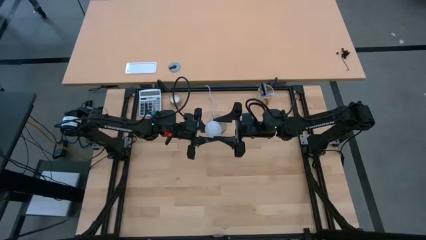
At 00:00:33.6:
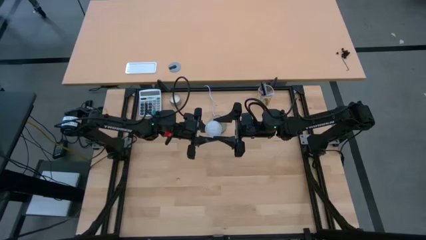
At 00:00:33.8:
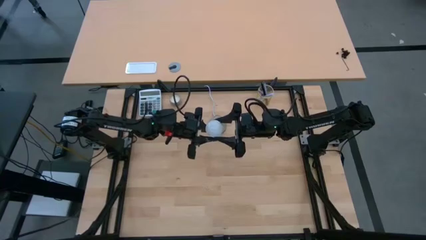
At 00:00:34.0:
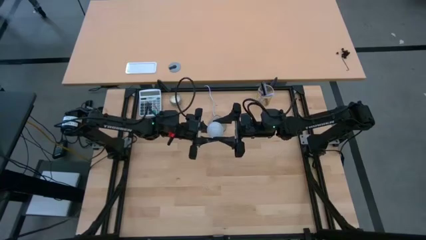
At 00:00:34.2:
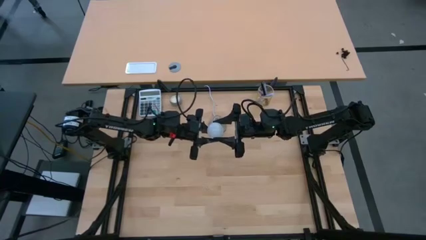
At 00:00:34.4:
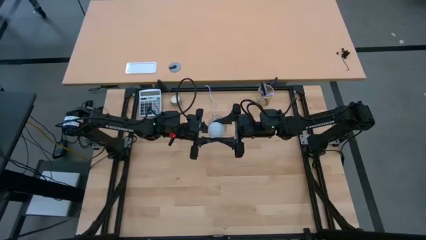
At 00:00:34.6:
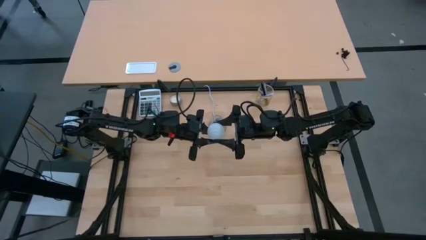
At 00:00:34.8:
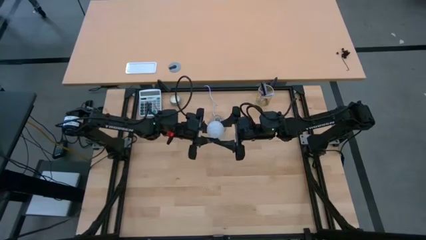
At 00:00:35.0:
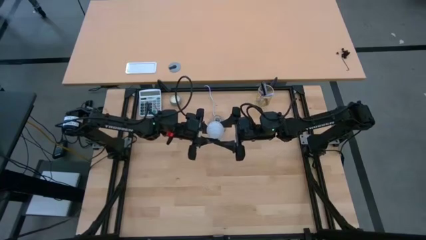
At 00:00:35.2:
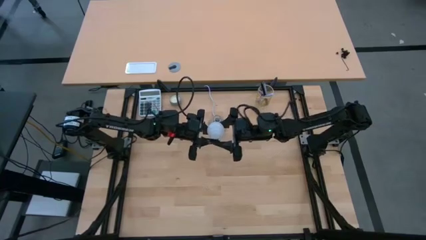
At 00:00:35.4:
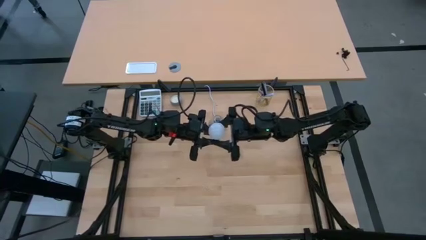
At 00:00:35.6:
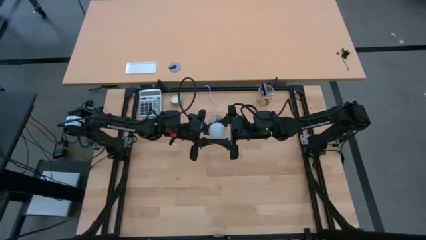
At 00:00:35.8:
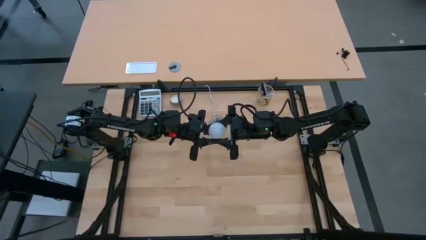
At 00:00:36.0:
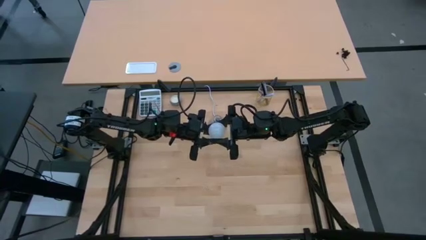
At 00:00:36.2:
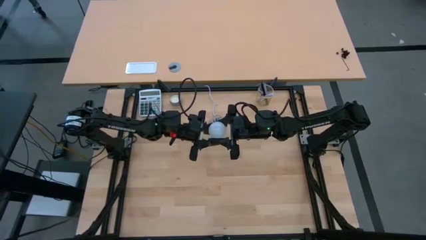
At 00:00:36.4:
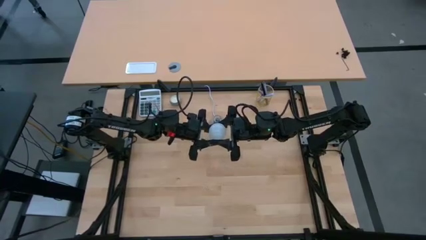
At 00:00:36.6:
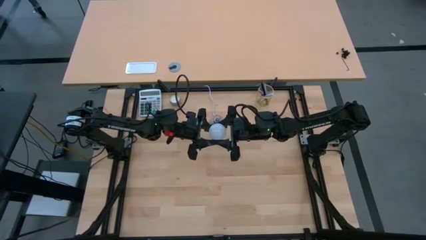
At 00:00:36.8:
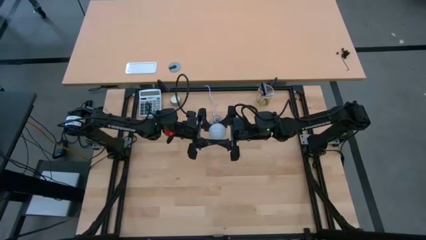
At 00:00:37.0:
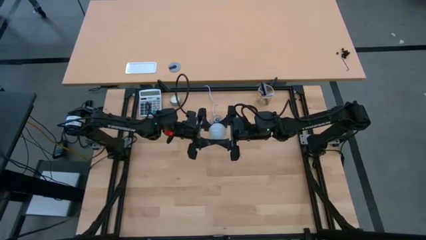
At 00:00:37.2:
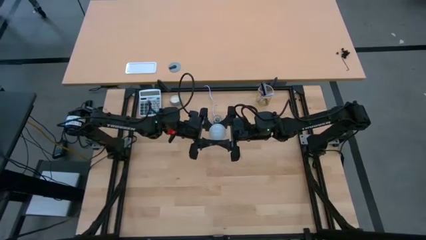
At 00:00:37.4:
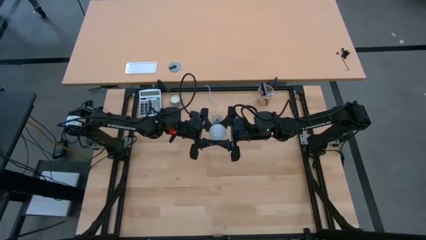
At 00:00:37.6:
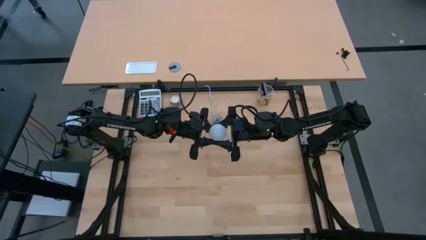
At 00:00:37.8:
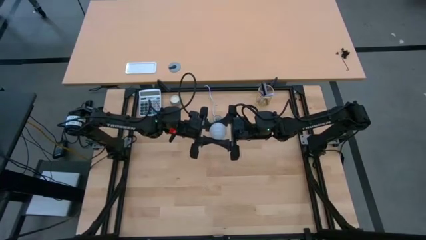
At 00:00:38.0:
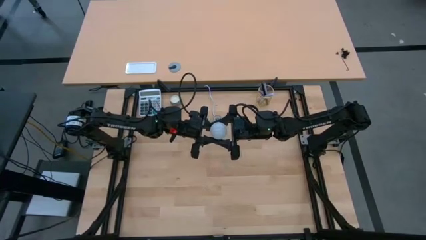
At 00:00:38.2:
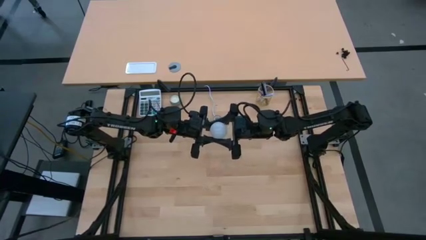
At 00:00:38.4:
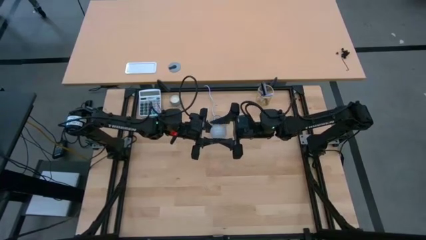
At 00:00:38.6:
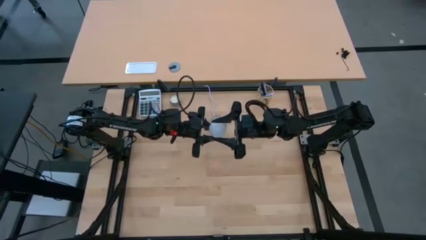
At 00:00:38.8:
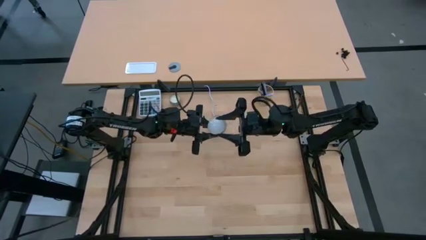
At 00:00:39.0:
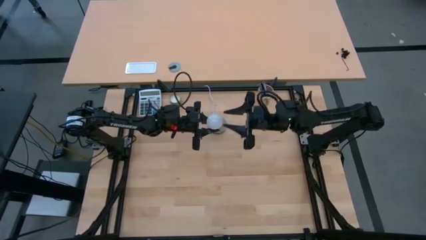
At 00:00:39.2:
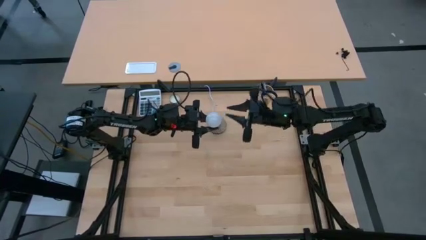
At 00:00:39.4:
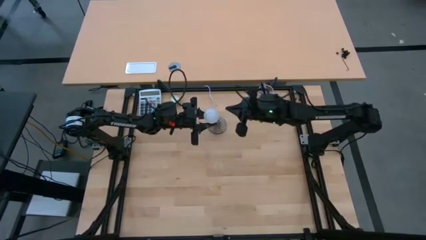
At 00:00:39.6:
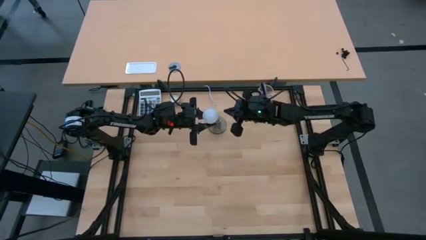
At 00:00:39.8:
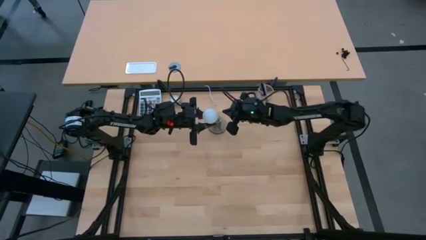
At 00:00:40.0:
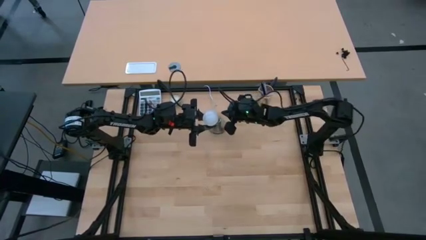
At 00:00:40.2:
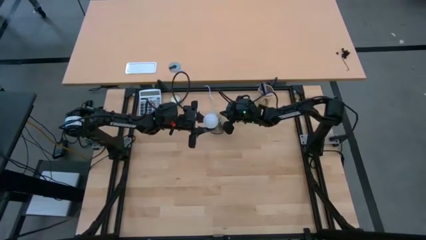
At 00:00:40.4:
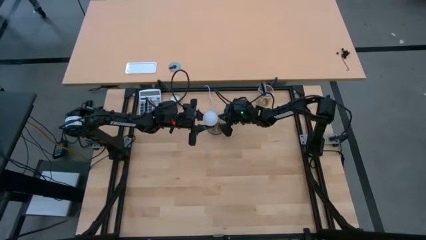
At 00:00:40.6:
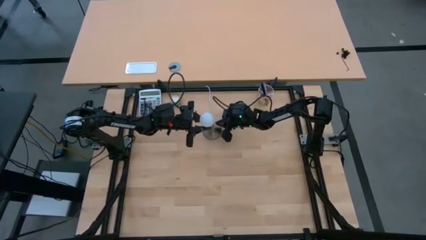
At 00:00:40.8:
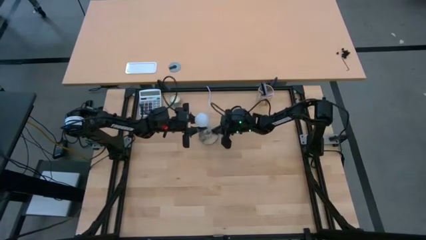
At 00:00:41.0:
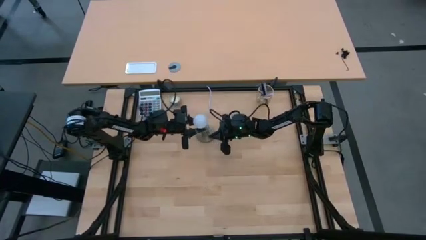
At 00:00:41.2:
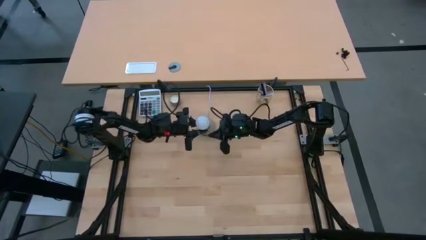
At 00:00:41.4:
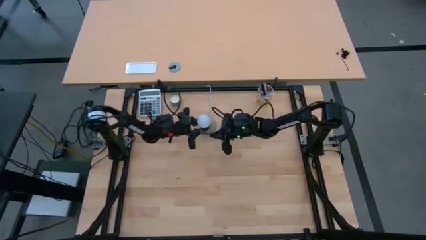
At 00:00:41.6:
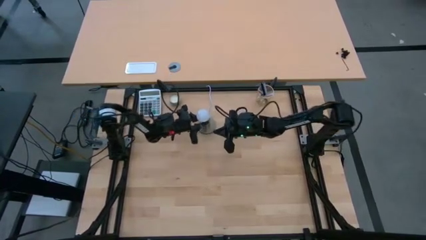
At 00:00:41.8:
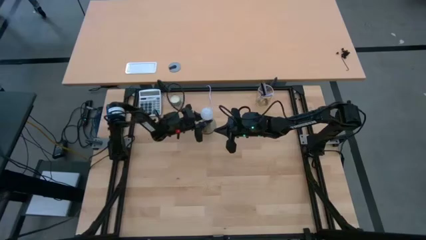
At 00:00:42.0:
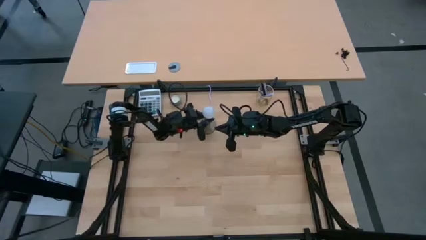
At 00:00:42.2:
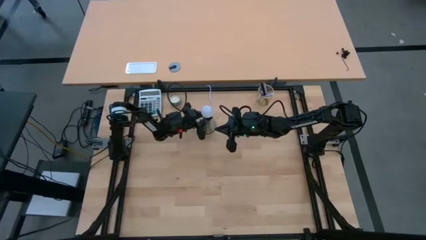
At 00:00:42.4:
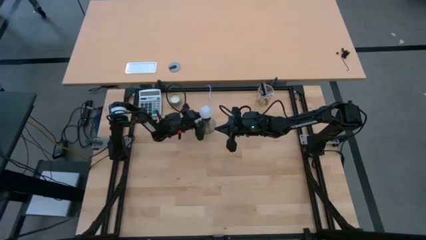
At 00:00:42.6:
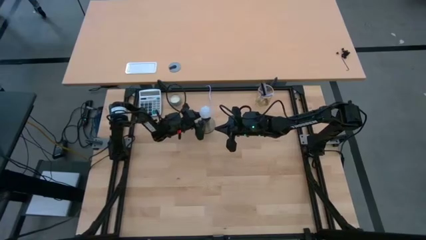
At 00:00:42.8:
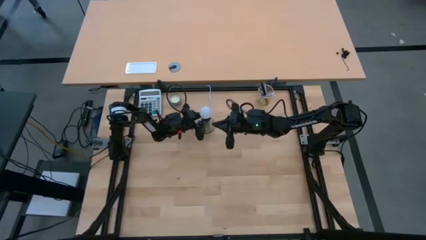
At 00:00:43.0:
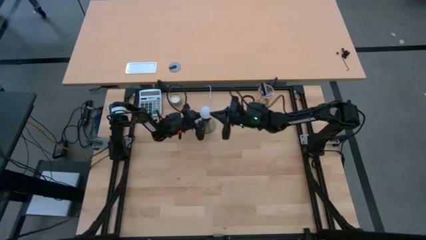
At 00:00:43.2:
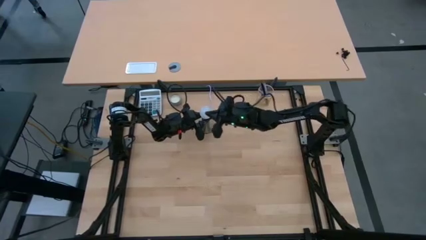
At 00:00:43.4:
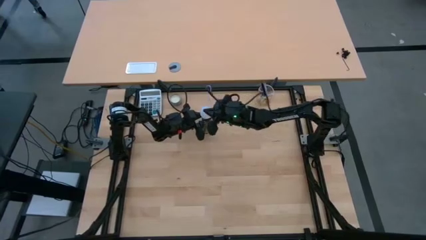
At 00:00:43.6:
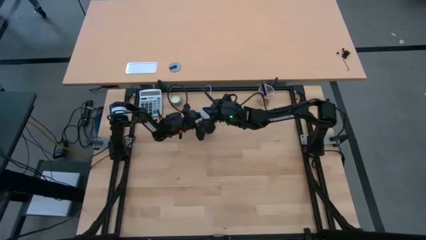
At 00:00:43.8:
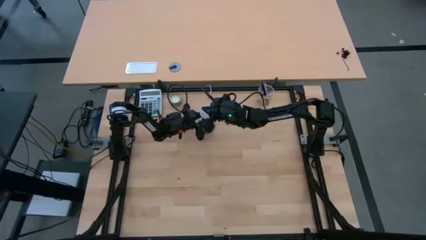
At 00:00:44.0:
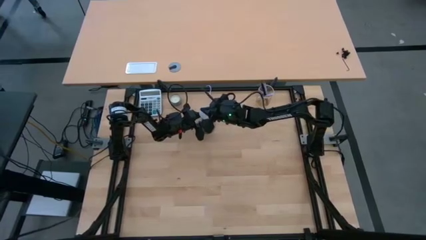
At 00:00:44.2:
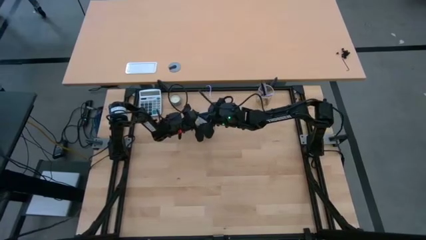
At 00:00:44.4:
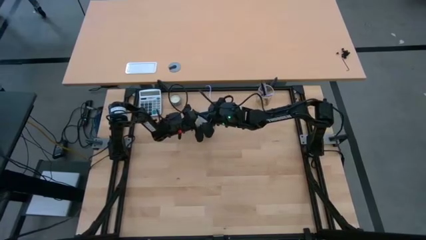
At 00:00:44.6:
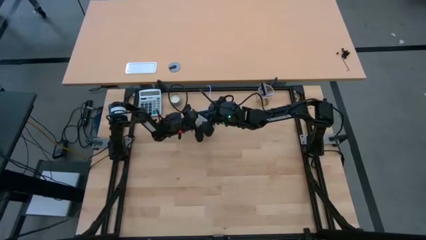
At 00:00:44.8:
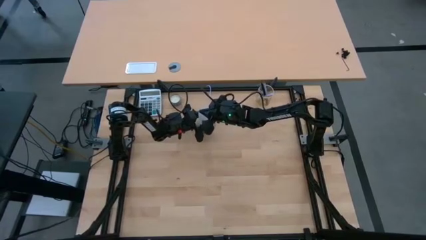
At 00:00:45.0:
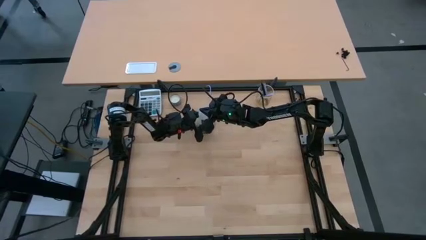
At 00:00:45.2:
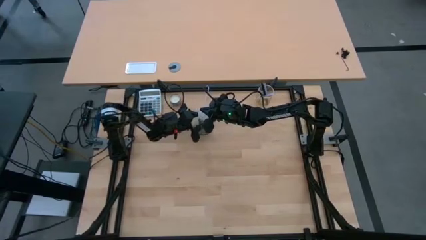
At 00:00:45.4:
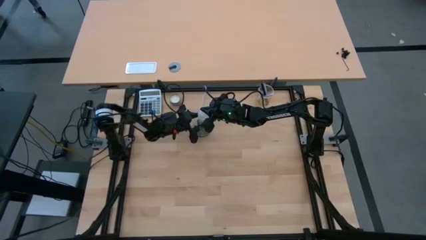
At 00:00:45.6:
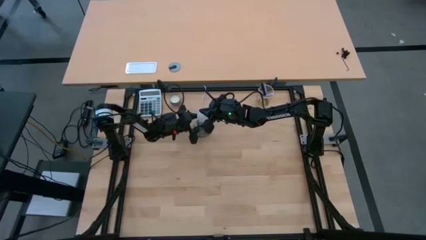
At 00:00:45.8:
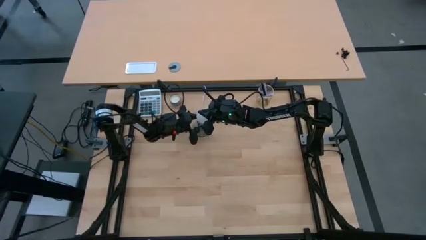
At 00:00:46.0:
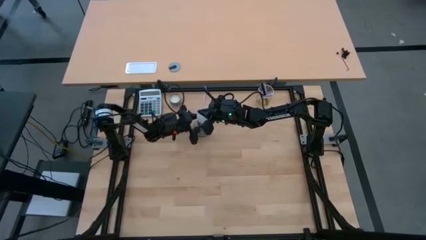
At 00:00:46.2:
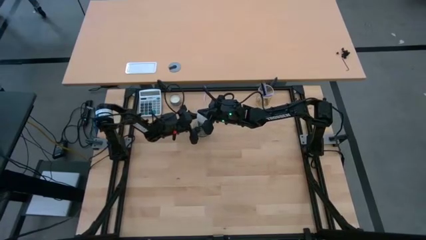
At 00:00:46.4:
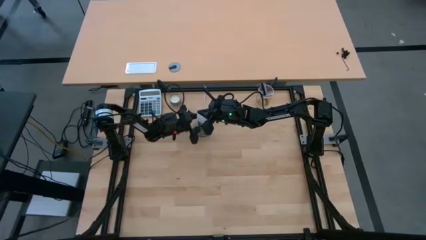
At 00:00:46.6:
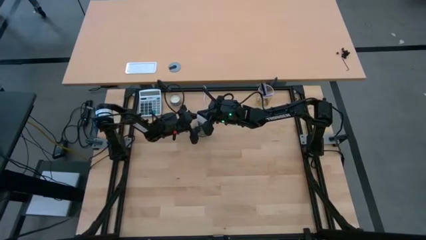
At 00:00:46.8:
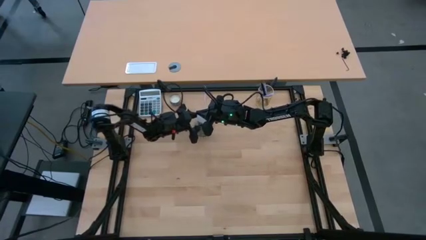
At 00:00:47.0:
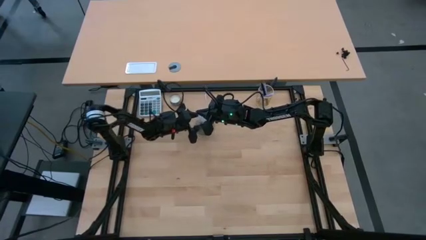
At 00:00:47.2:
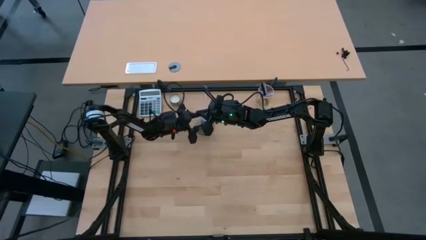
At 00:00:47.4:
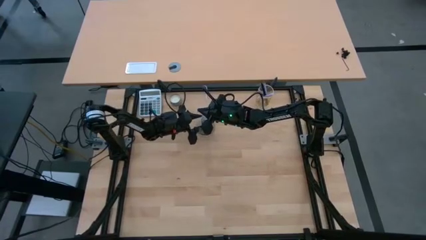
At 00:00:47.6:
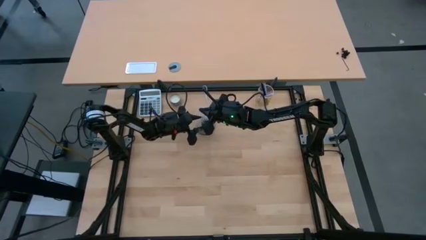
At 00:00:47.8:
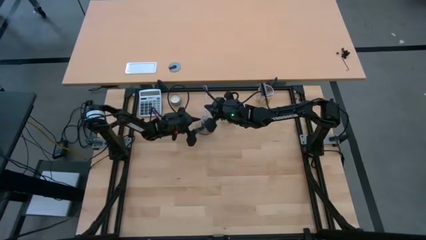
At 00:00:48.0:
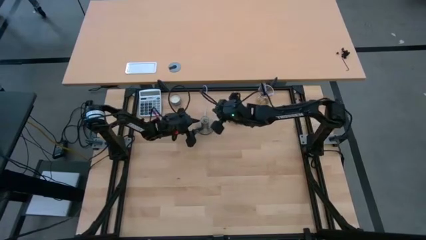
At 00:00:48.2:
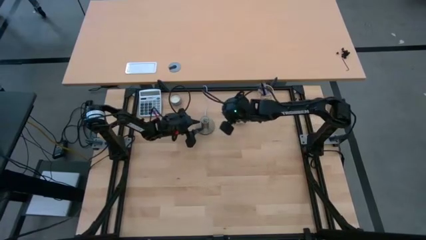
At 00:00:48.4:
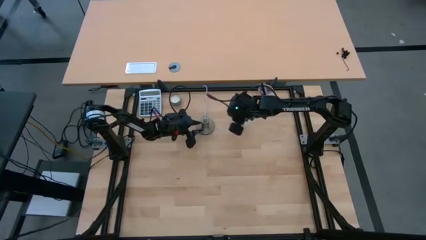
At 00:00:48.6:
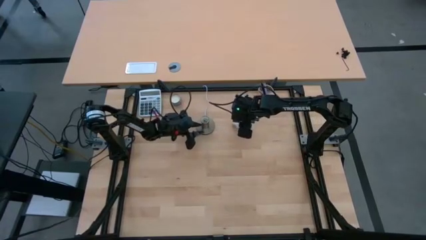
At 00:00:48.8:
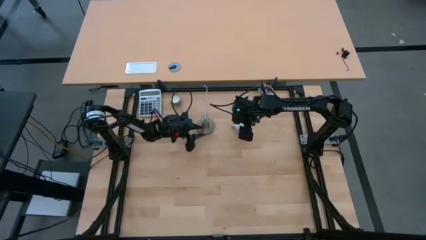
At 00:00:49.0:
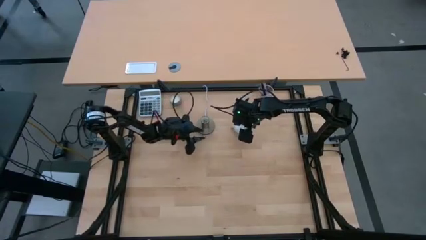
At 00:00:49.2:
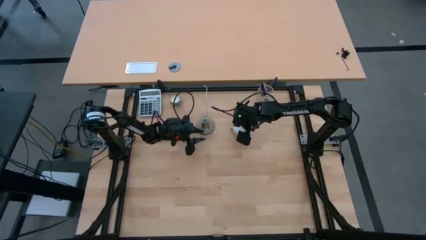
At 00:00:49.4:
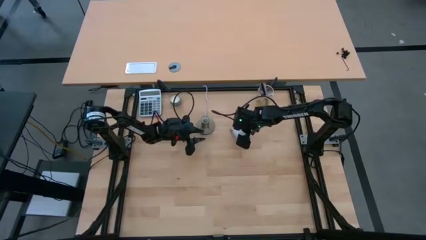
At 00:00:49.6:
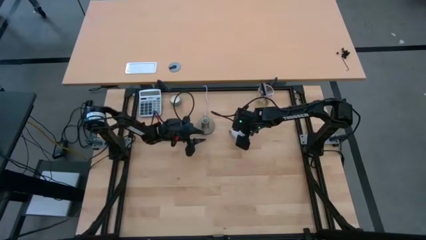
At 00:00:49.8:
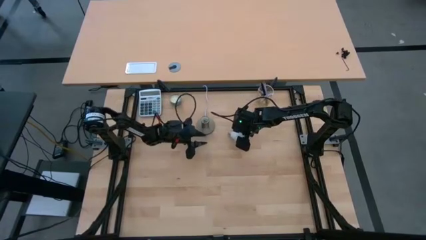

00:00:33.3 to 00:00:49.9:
Task: Screw lightbulb
Insert the lightbulb into the lamp
